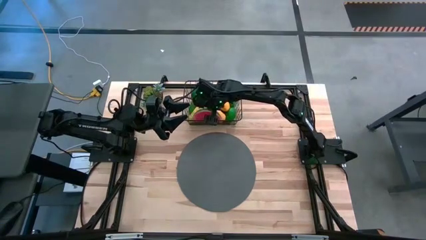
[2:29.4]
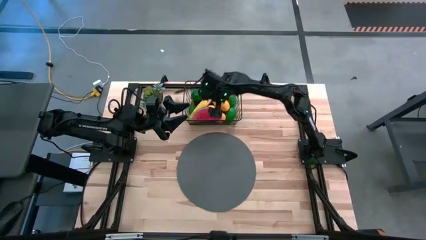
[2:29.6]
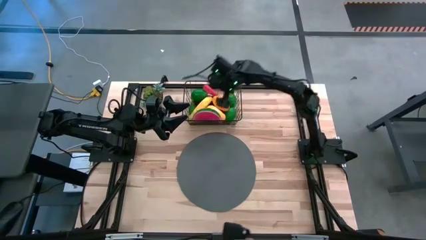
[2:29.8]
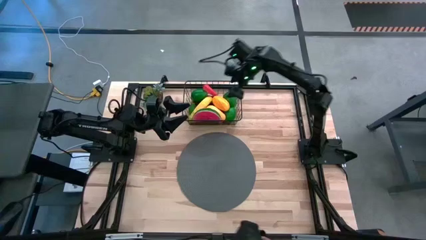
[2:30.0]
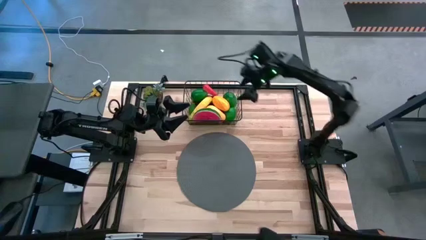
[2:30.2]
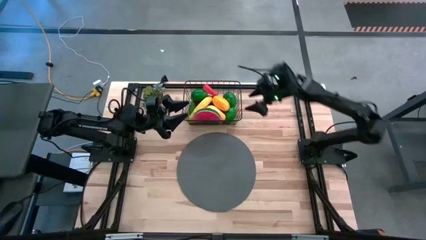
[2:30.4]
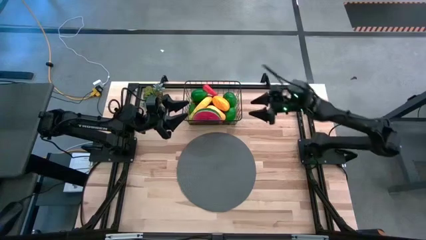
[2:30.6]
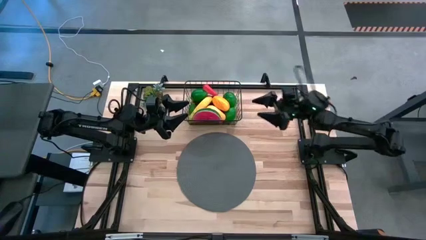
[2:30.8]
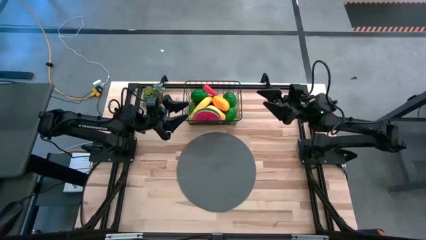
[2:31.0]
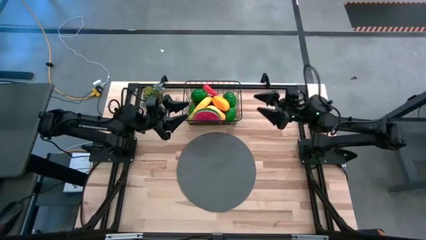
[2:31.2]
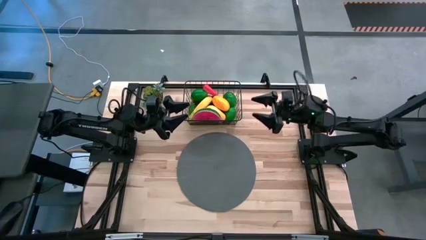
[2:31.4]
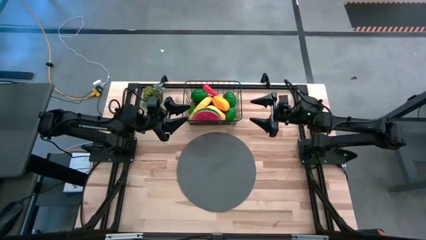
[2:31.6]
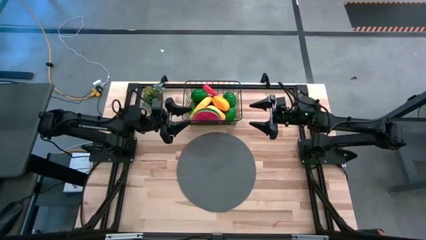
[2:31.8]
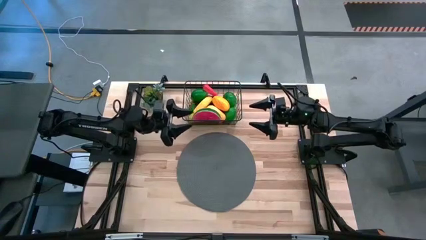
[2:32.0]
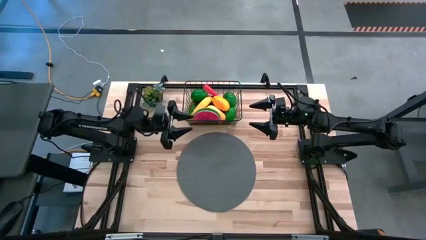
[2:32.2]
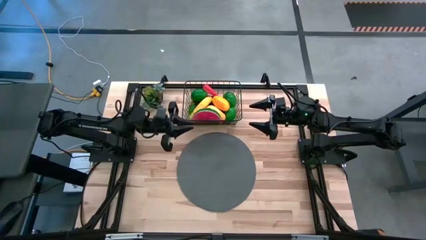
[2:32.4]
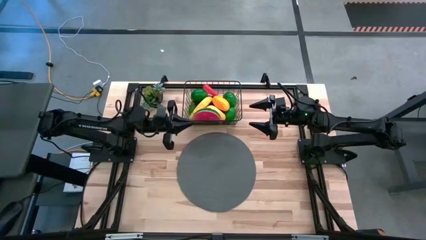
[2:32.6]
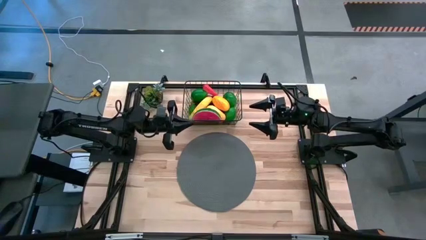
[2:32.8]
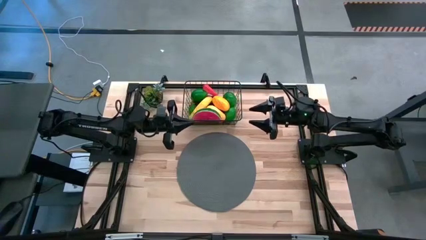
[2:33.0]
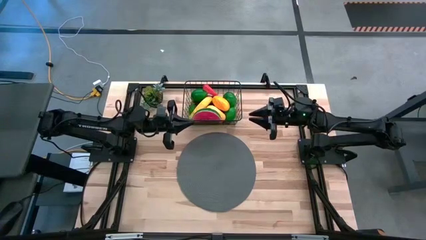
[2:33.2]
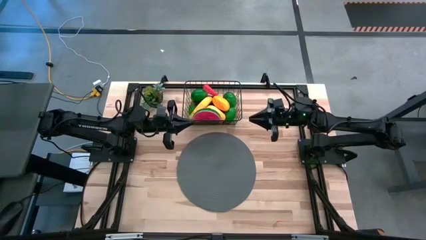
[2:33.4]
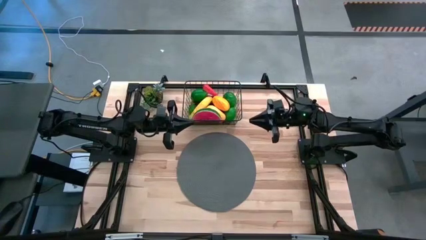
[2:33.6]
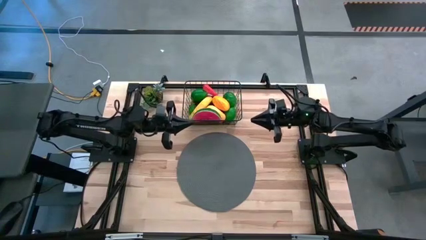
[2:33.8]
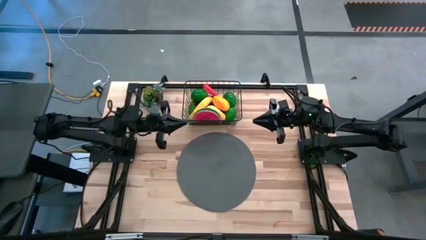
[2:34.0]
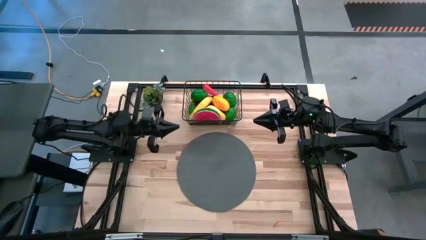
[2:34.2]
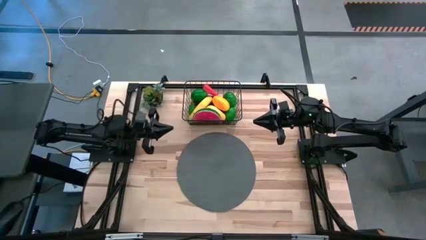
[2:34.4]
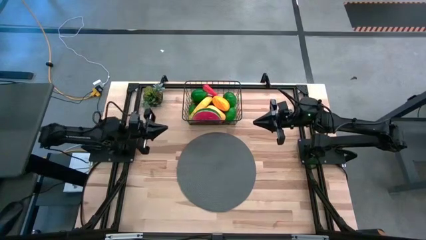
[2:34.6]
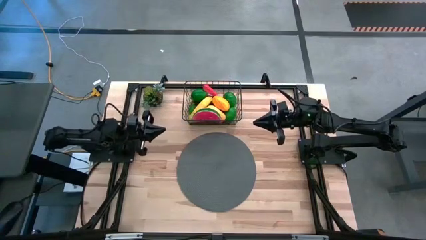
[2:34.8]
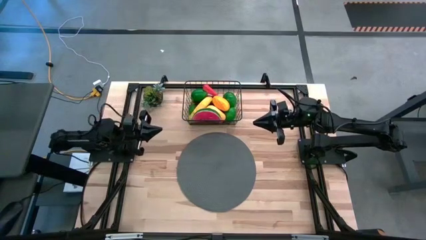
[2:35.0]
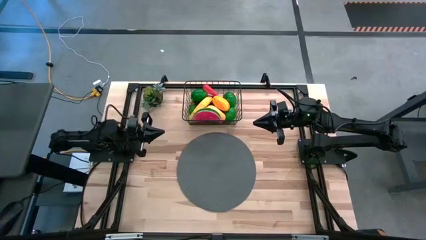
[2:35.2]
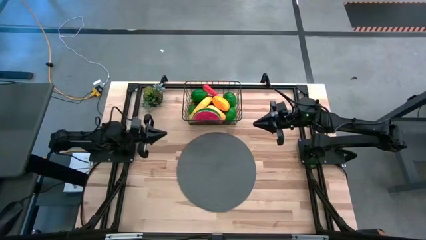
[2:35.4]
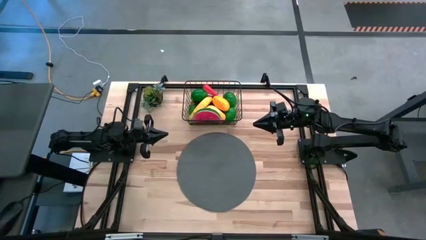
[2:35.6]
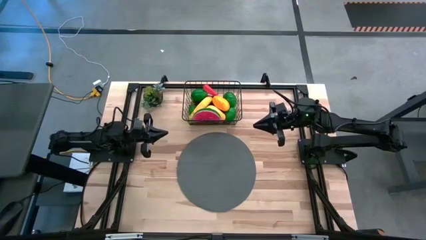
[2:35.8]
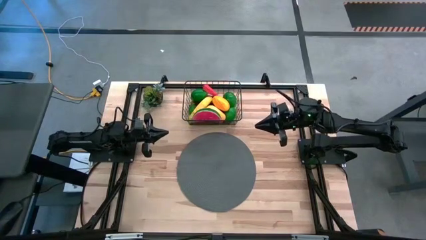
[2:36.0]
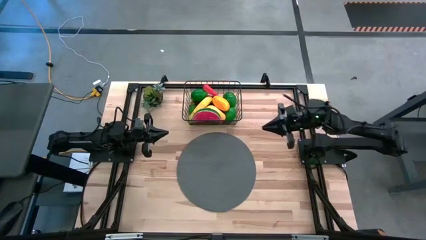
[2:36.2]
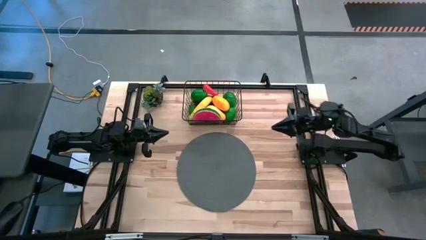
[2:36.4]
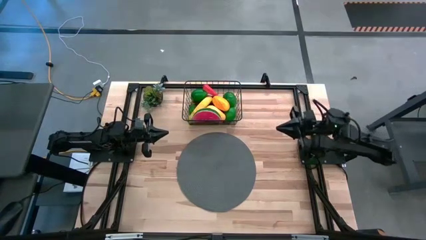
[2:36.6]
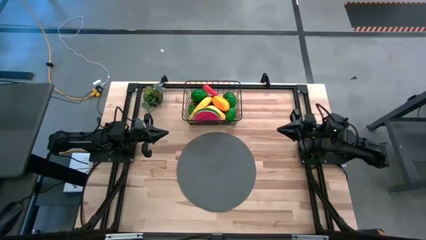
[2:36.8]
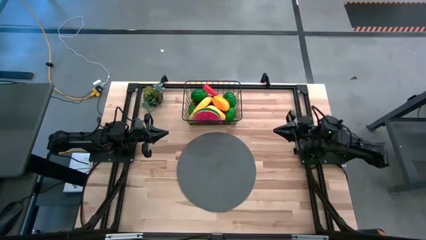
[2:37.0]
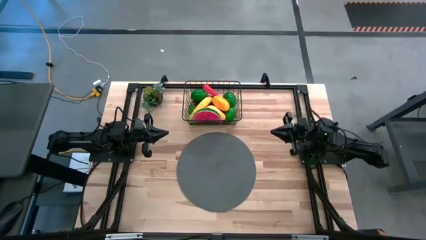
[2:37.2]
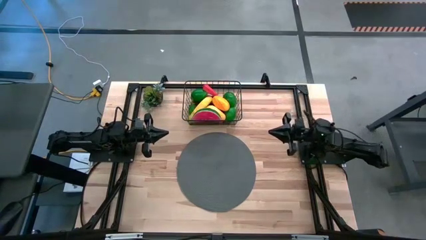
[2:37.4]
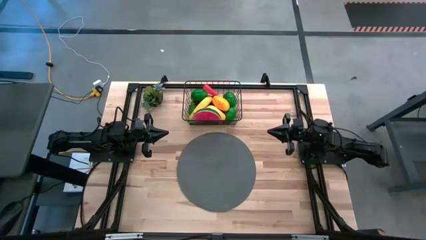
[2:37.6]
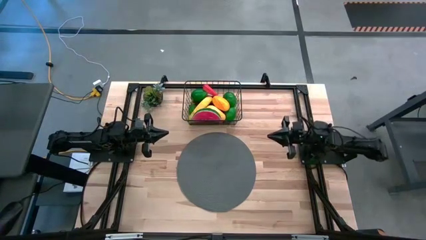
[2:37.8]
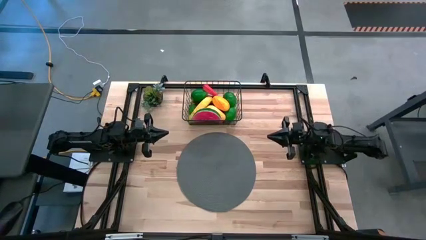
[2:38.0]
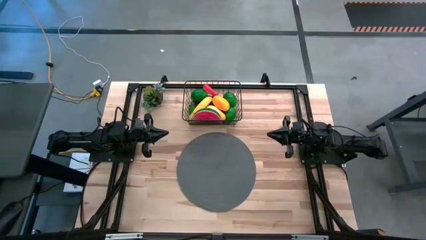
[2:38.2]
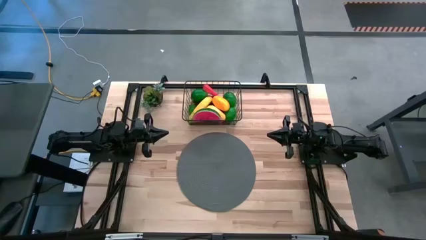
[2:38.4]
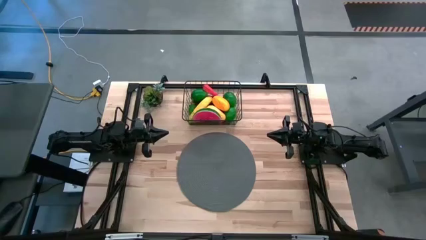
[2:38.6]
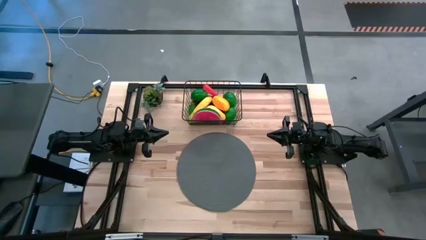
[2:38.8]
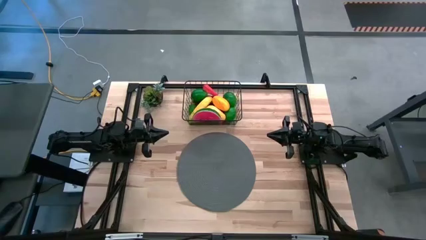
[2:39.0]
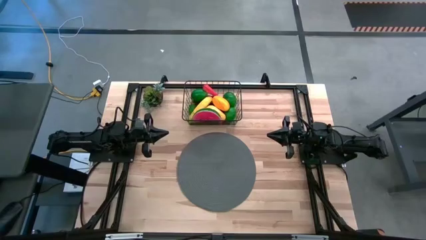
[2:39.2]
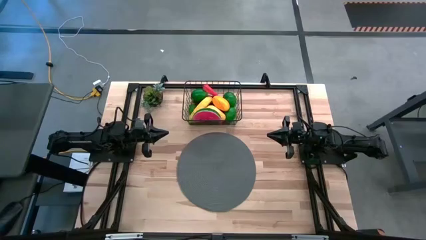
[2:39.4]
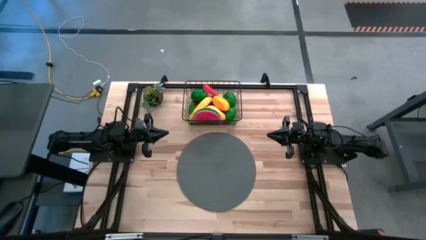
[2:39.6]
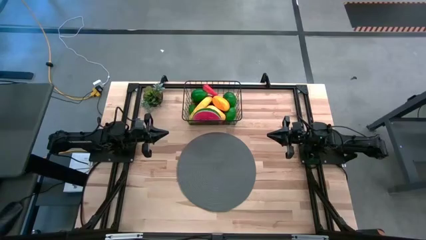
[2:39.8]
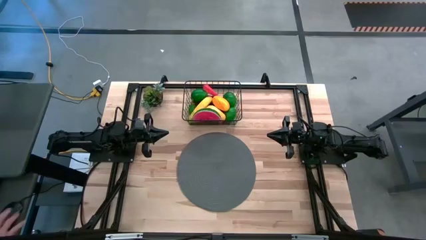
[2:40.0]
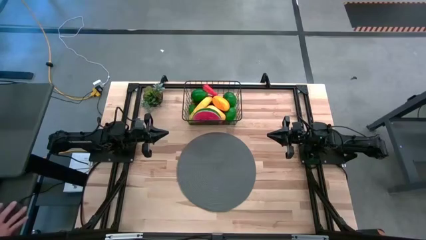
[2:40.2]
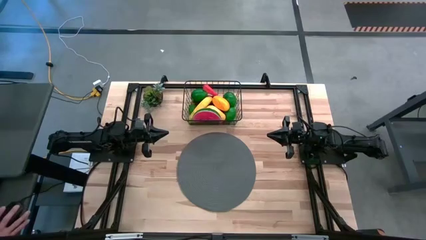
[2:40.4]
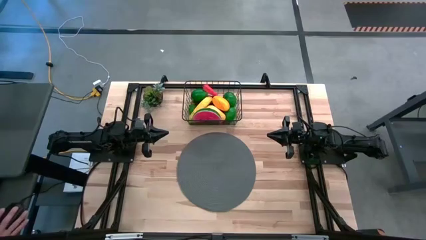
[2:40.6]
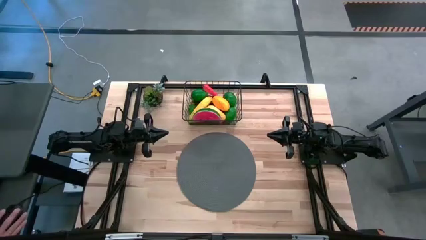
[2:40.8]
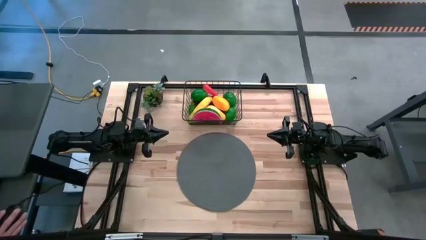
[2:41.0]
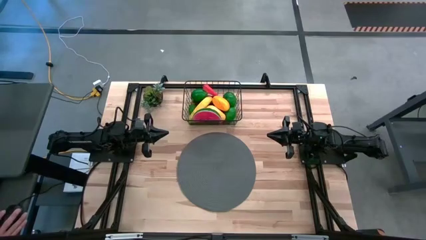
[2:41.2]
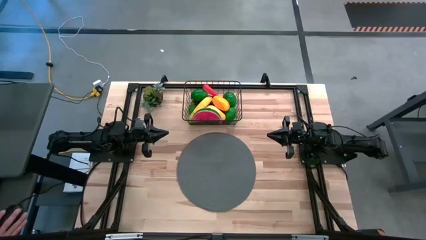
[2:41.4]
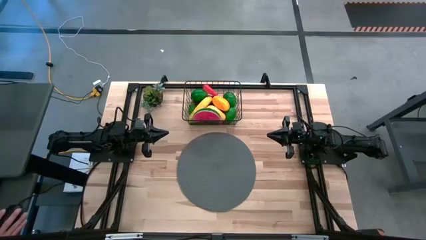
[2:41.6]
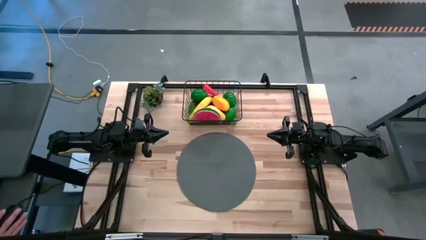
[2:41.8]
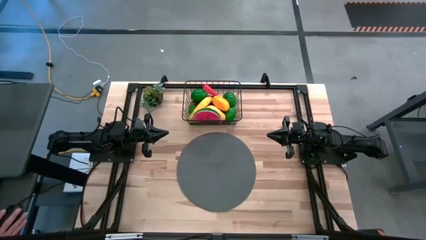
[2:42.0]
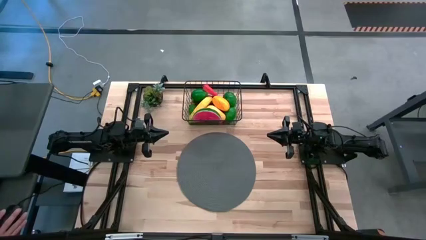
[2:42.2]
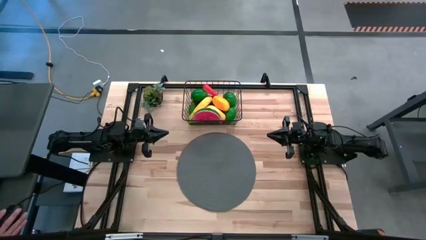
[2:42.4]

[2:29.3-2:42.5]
Task: Build produce basket
Return to Home Position

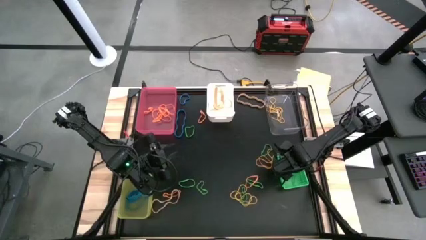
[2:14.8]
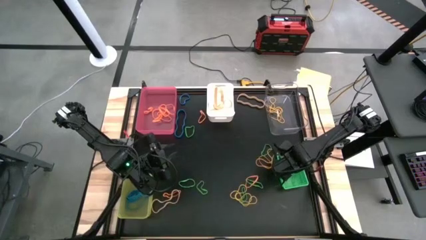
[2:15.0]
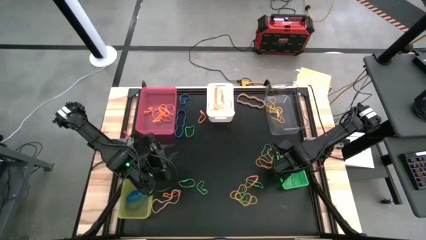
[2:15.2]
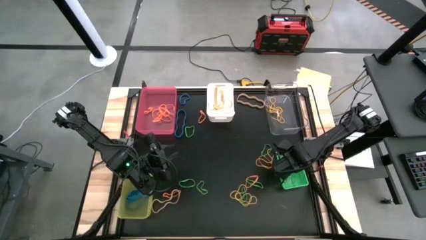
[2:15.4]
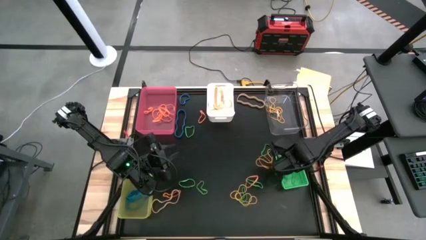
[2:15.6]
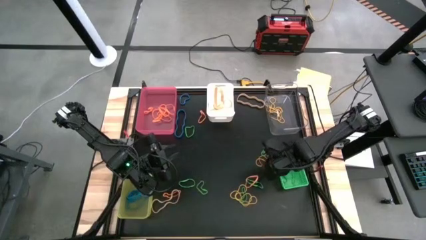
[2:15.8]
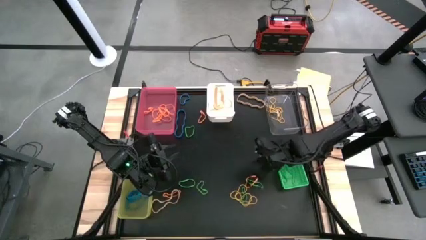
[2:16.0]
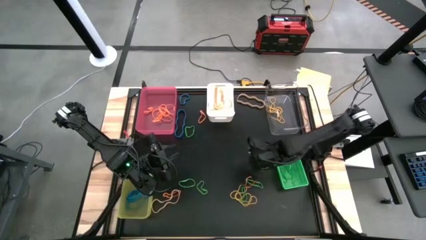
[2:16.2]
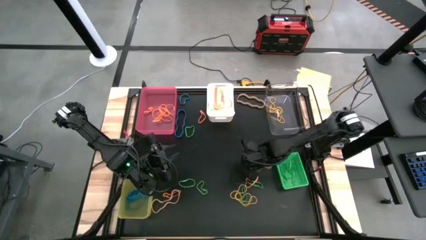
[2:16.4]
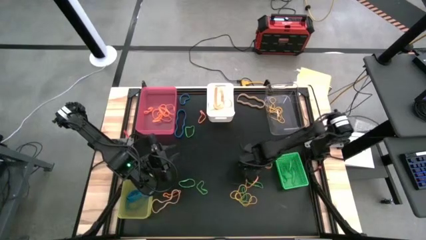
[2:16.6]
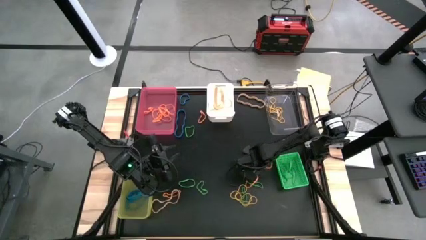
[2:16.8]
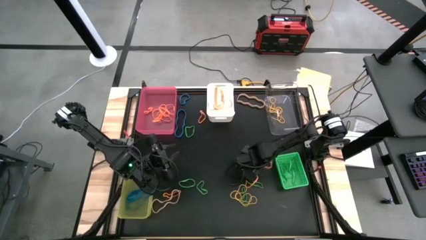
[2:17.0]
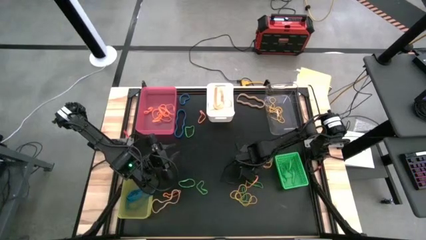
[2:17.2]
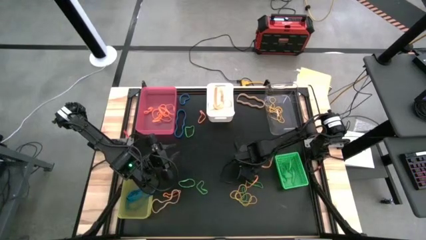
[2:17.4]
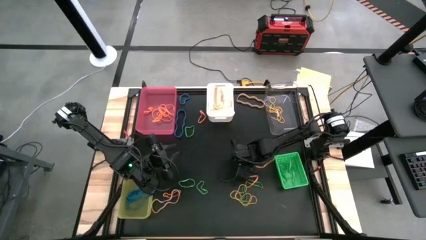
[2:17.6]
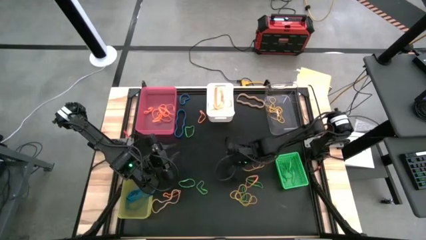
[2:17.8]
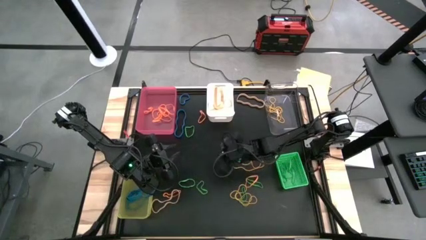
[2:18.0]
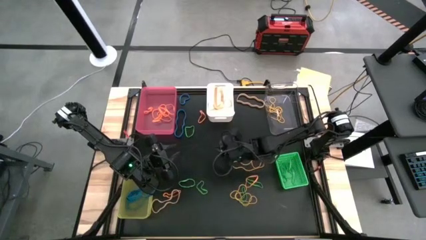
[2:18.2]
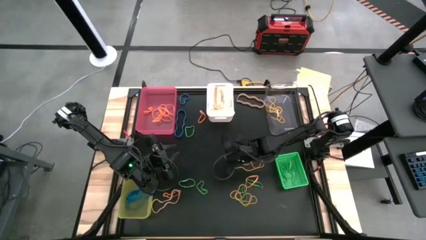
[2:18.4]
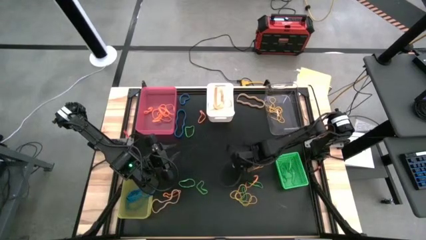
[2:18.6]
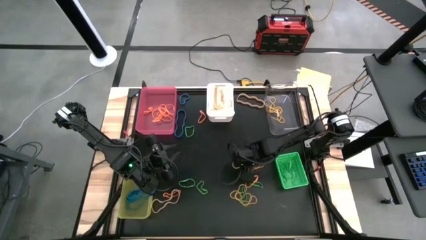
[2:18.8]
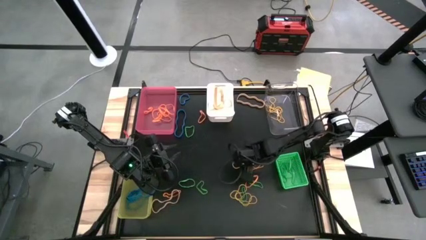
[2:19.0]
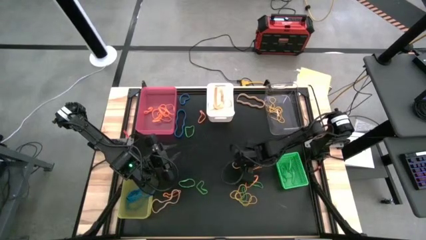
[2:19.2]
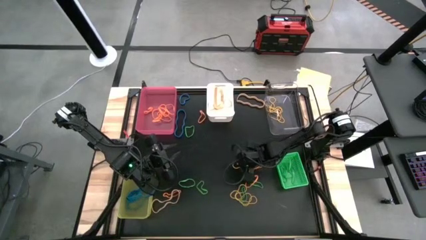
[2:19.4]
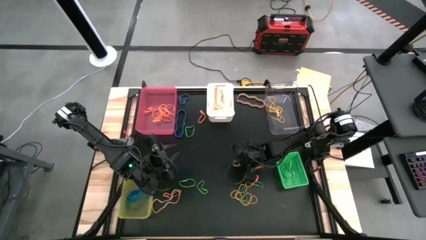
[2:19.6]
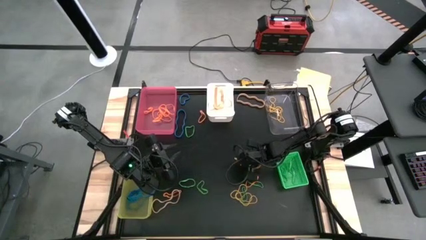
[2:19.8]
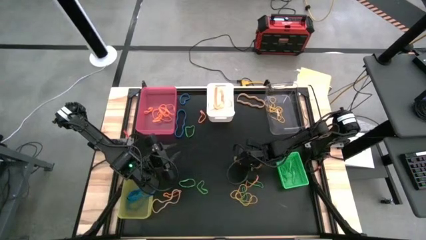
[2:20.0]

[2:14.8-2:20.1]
Task: Sort rubber bands into baskets
Put the yellow rubber band into the transparent bin
